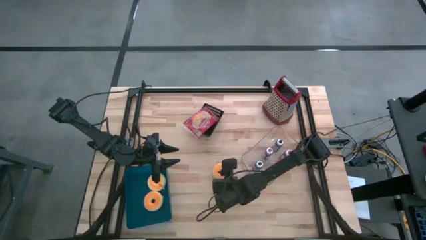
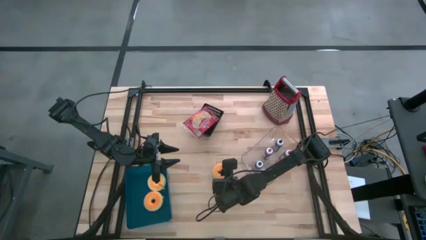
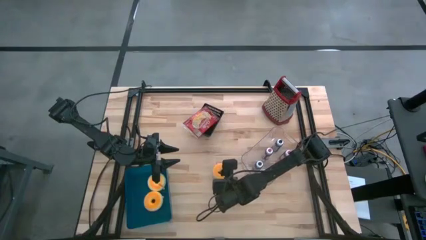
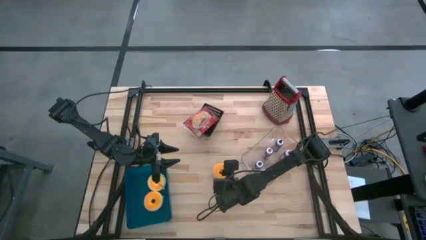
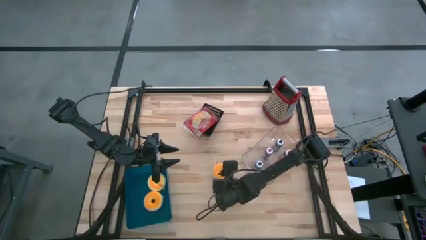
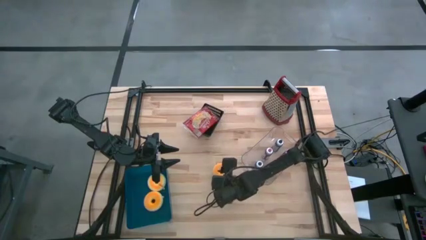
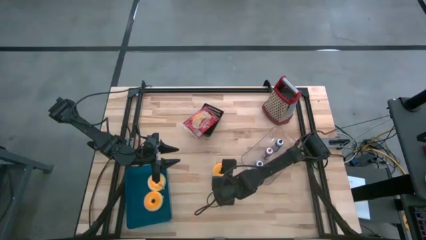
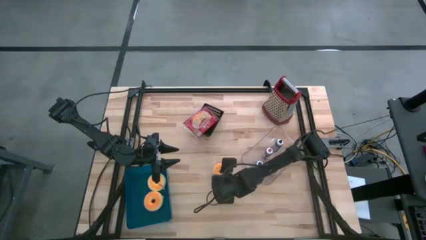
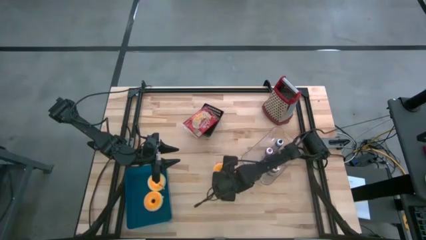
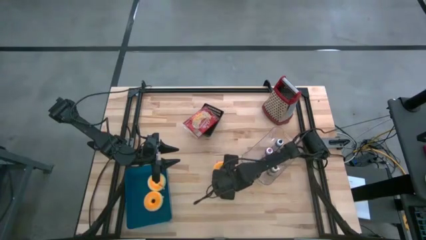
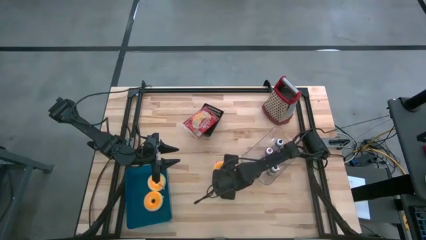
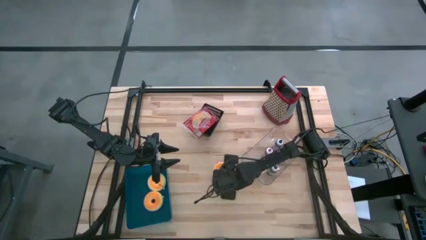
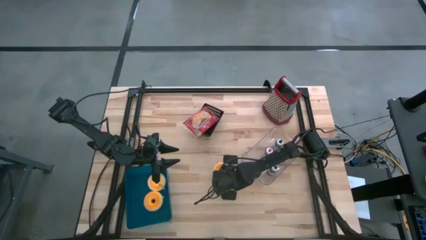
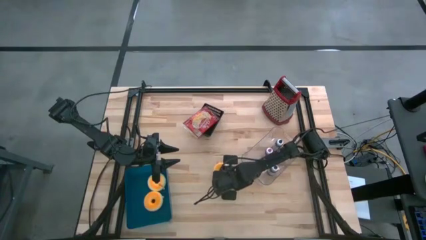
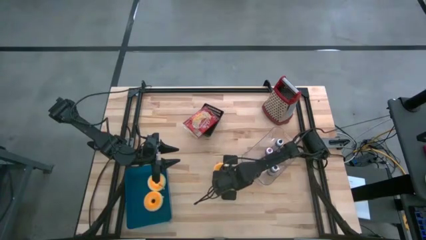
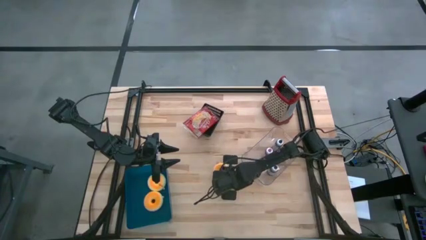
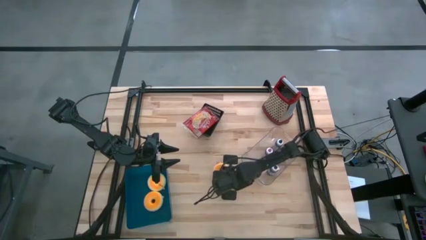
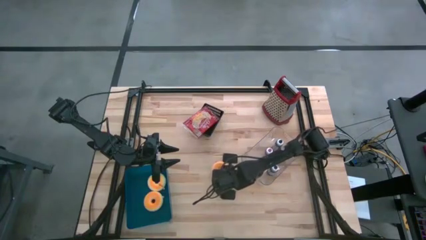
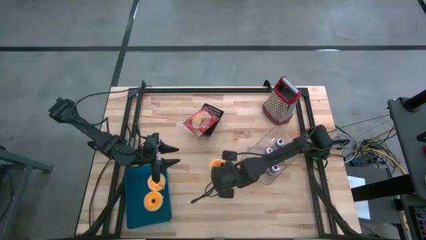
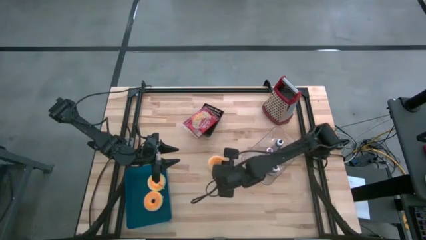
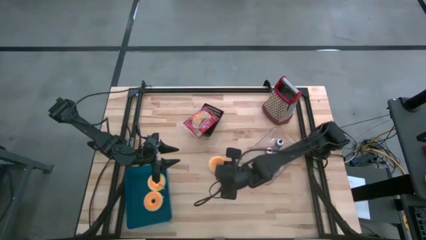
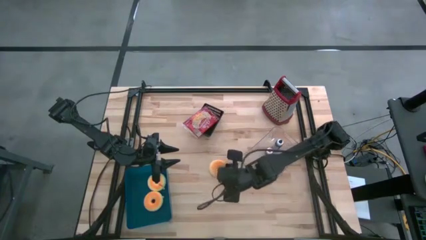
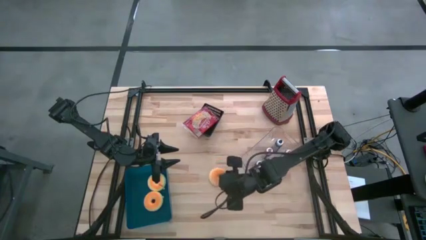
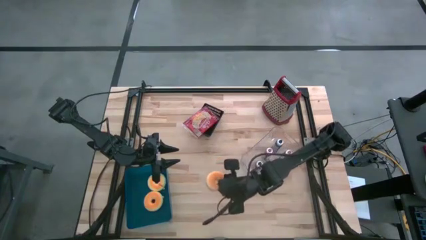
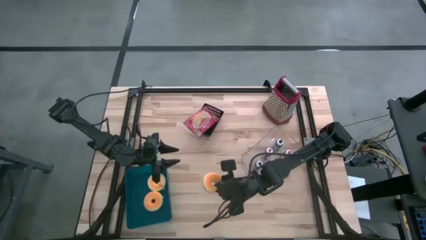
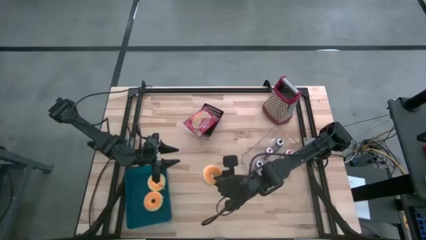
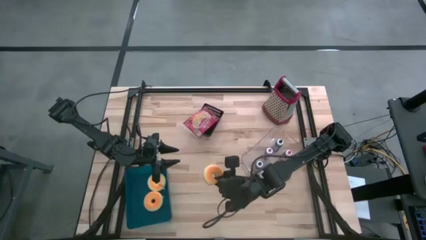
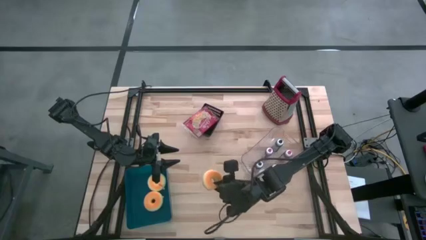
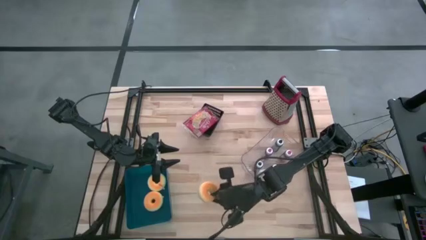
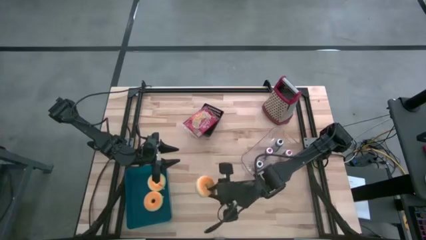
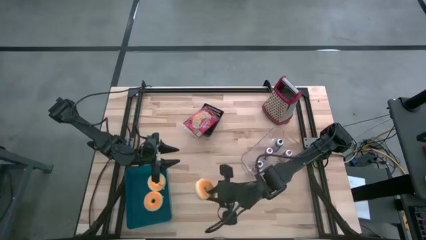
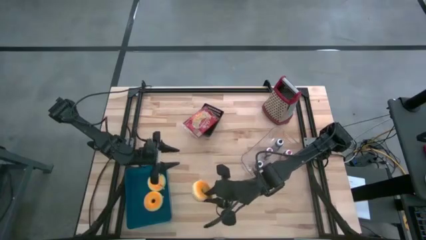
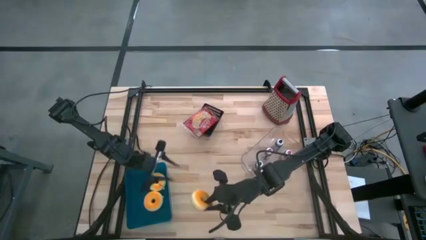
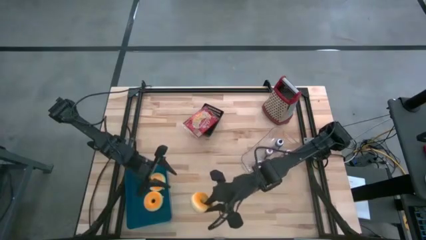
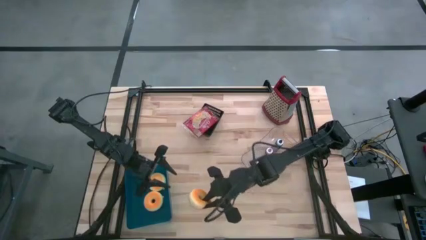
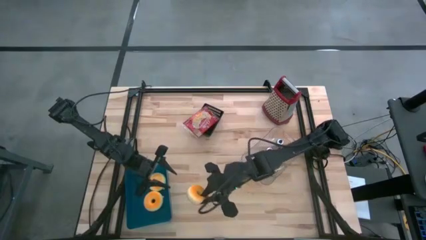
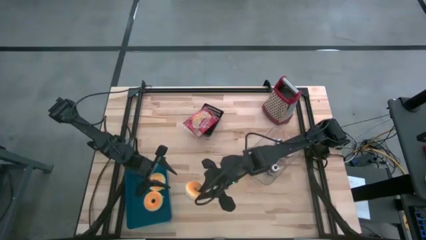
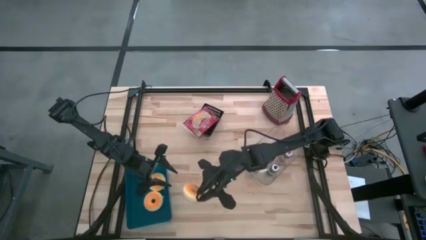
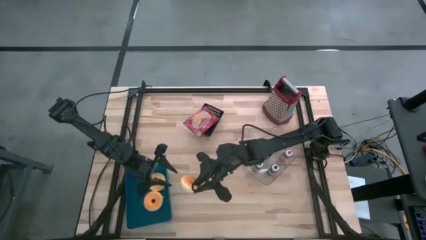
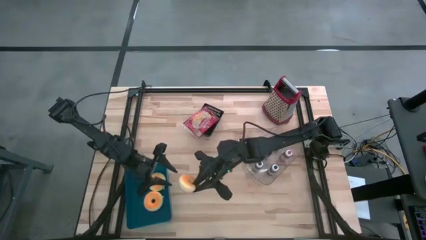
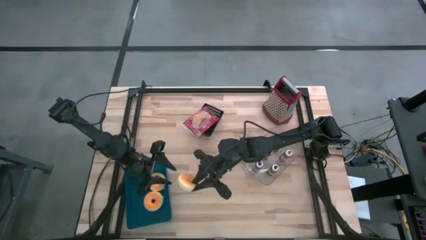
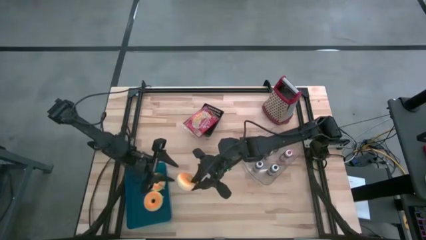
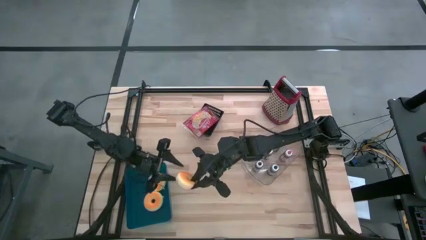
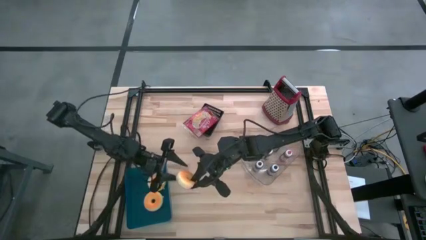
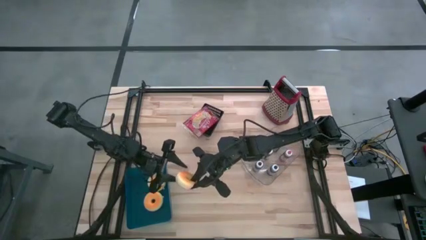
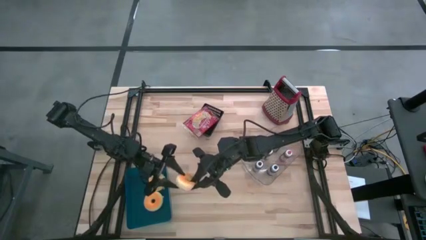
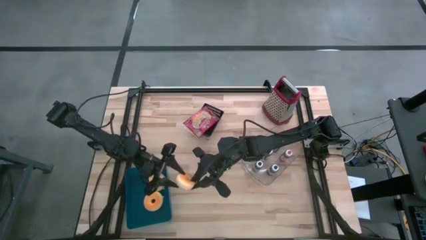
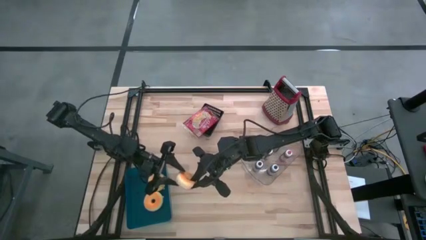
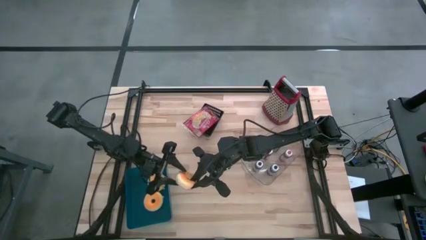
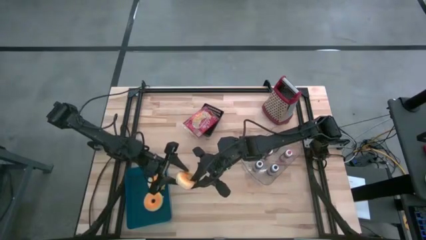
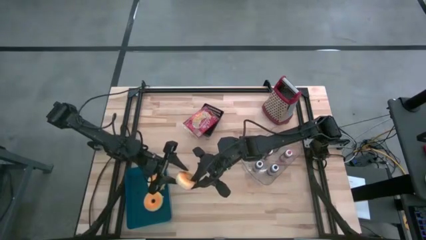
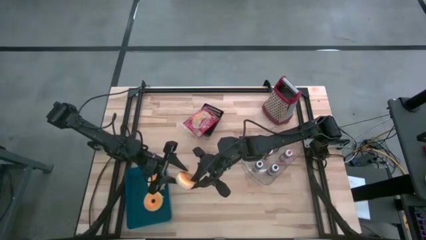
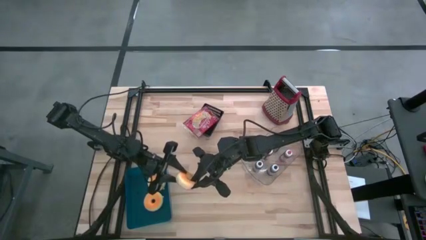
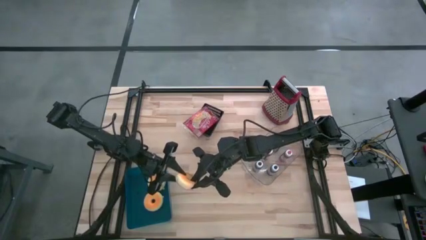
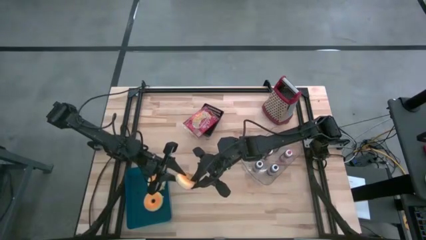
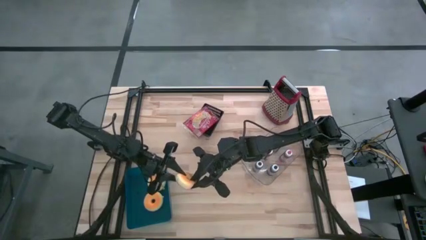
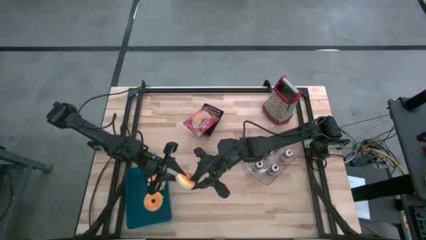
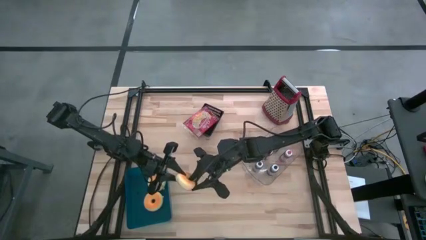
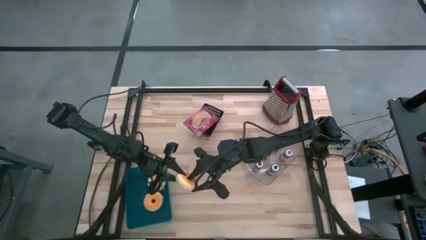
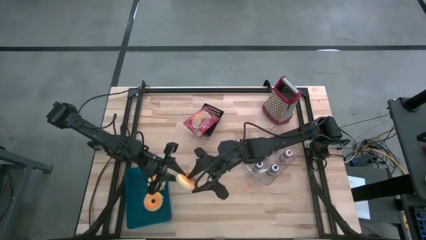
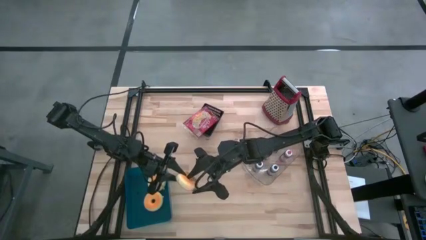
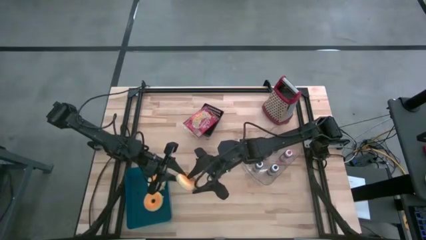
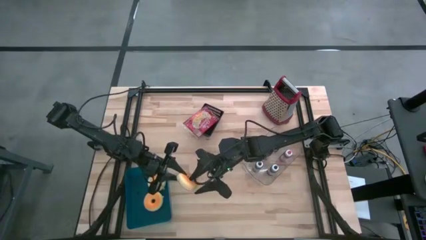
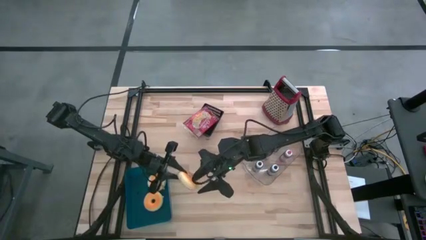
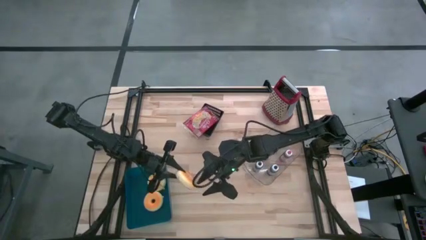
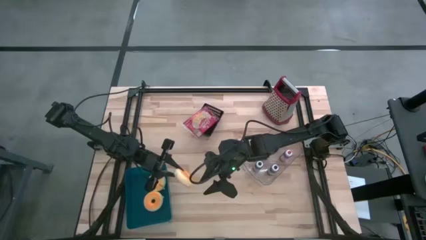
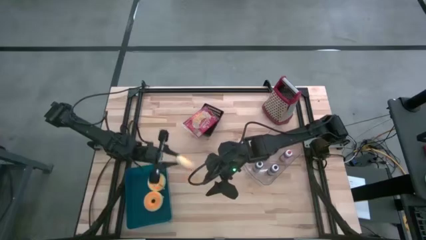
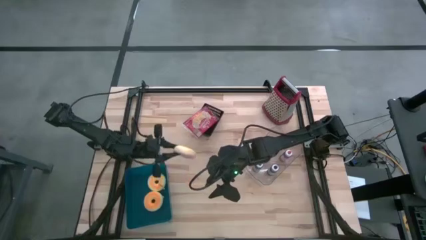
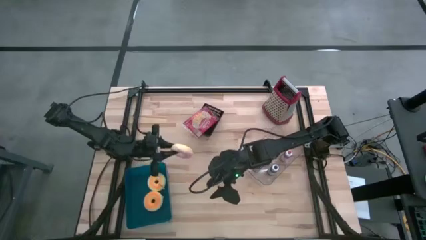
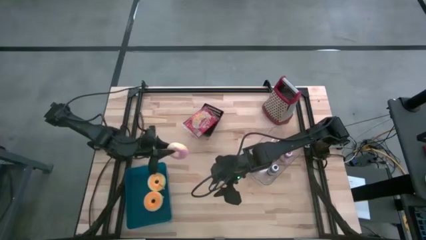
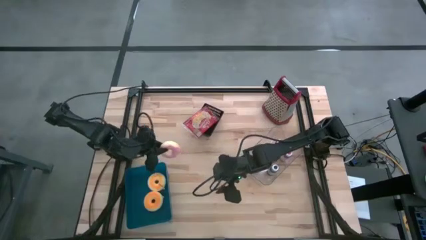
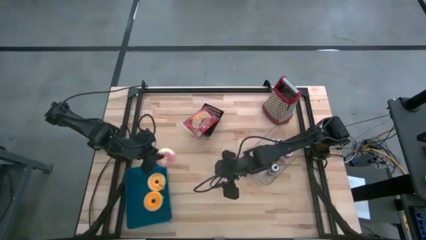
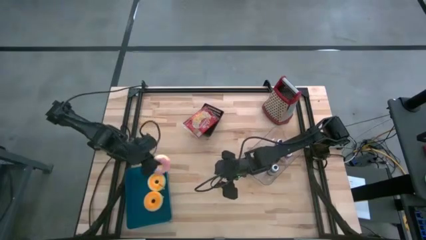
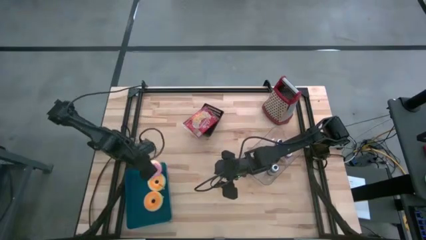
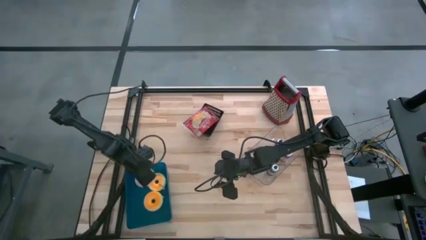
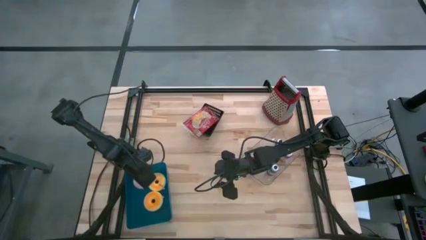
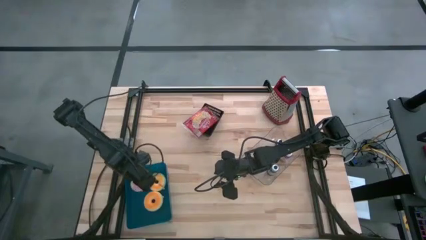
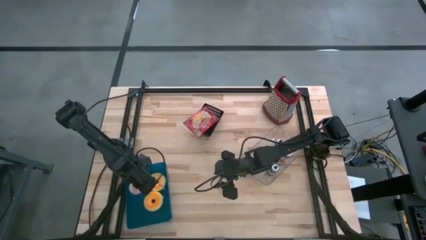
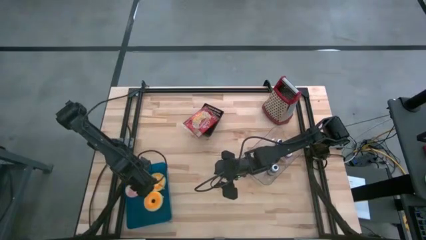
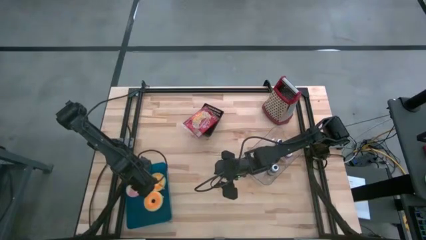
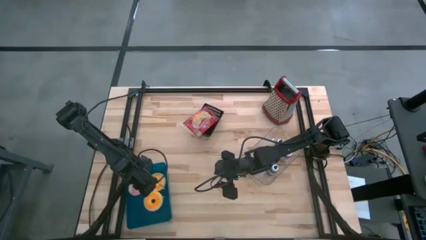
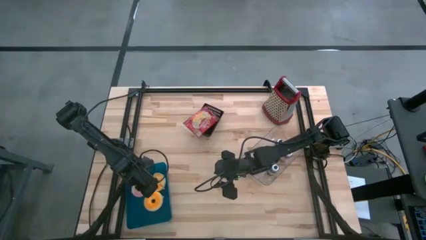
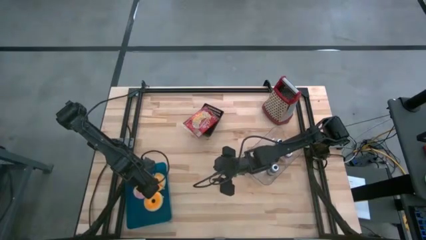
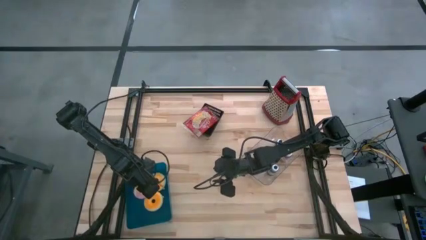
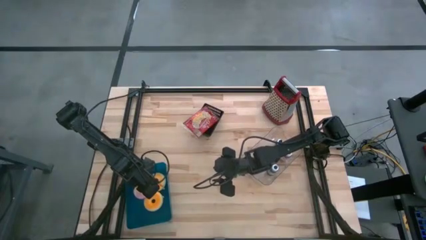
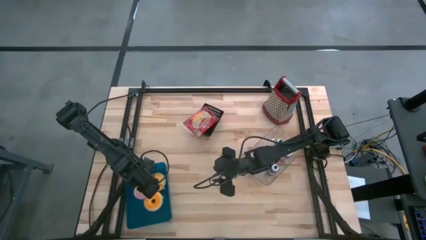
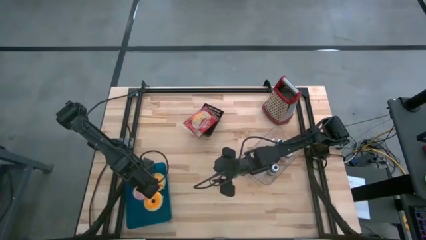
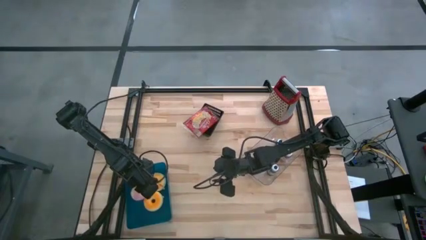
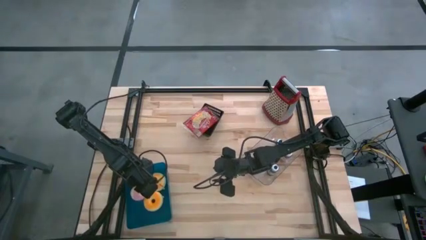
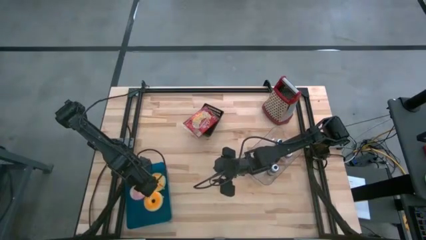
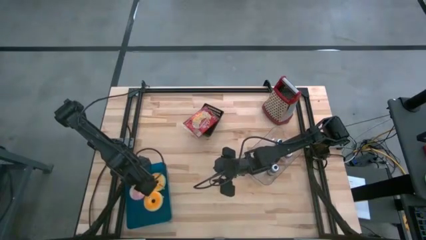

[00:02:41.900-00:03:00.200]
Task: Pick & Place Food Item
Put the yellow donut into the blue bin
